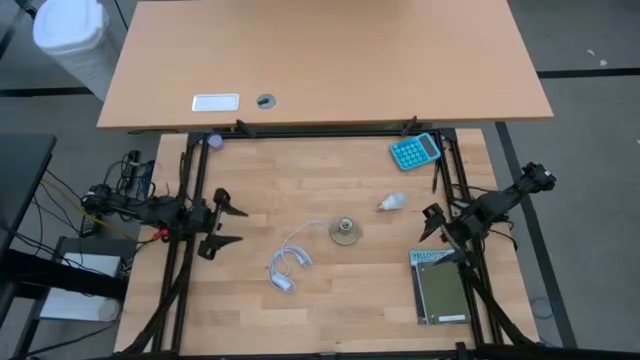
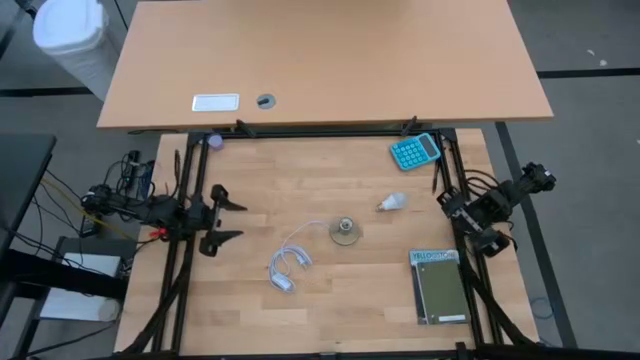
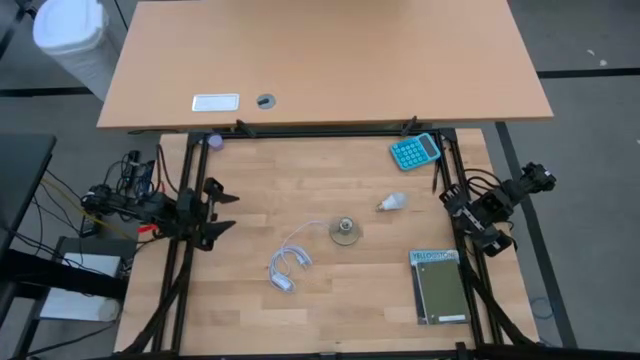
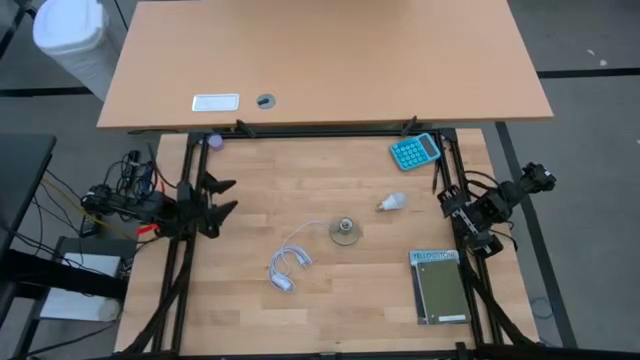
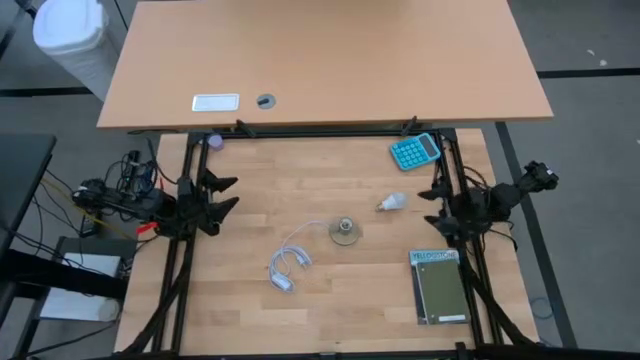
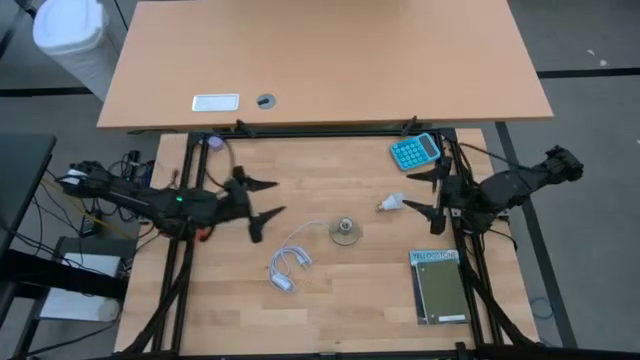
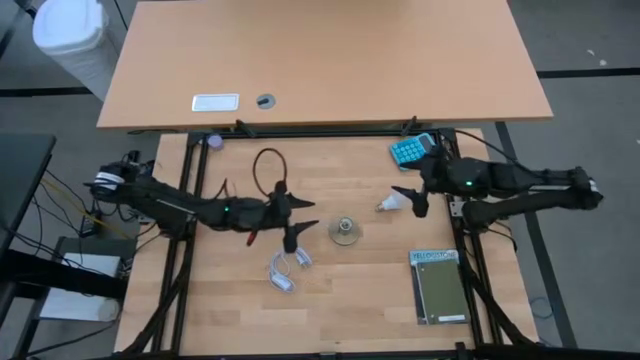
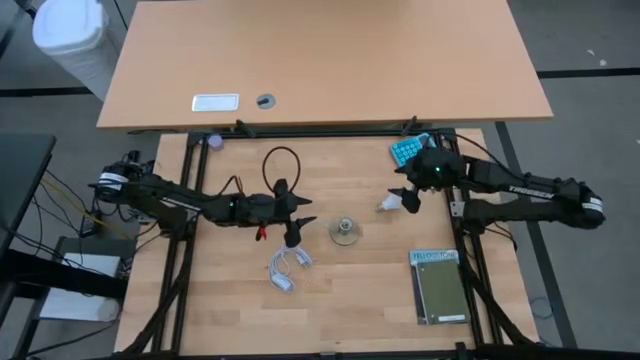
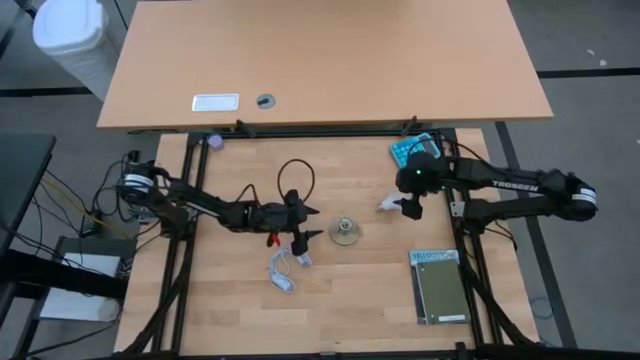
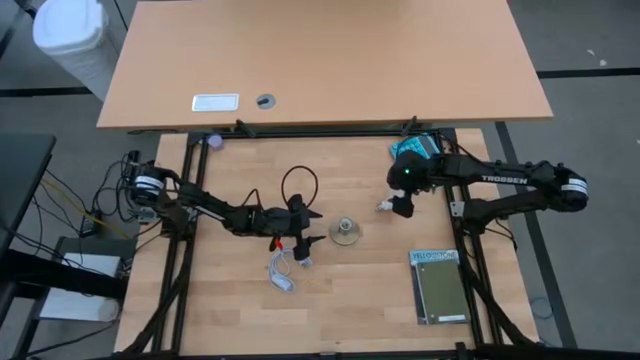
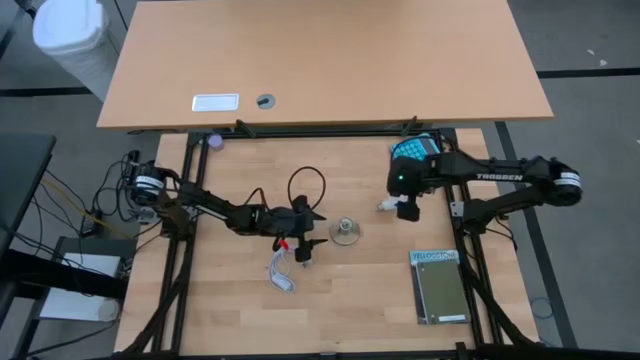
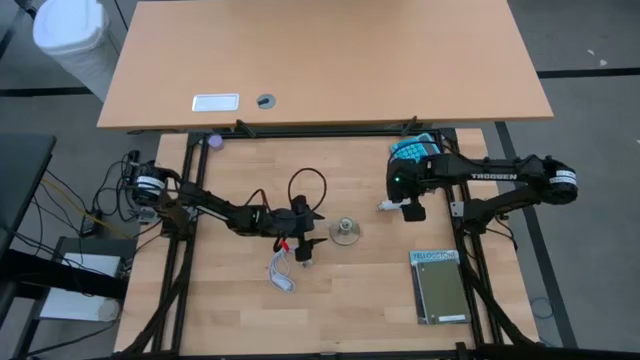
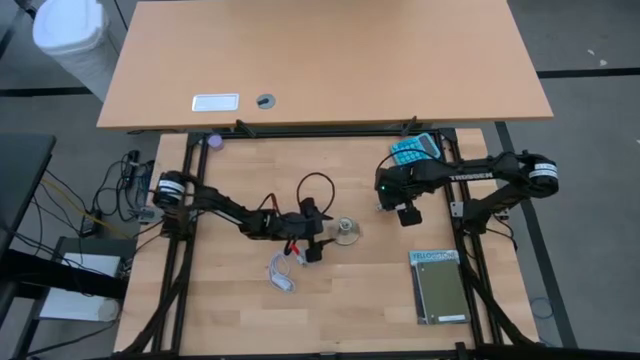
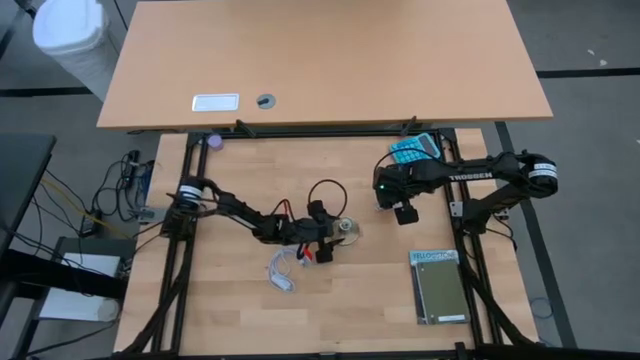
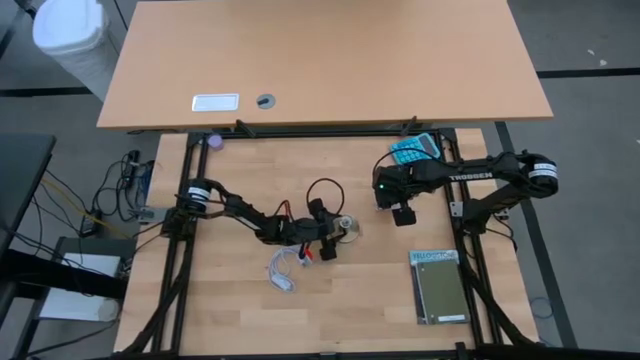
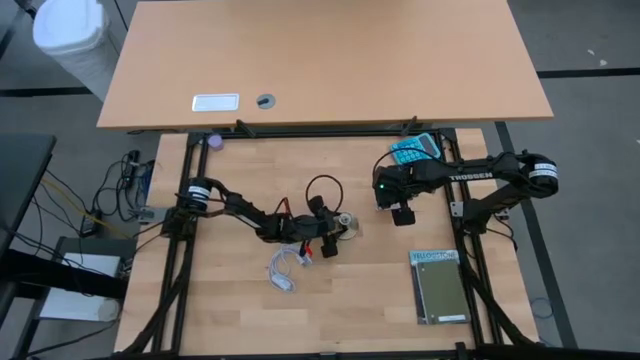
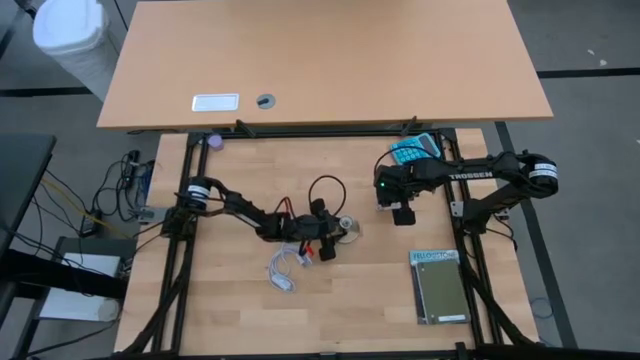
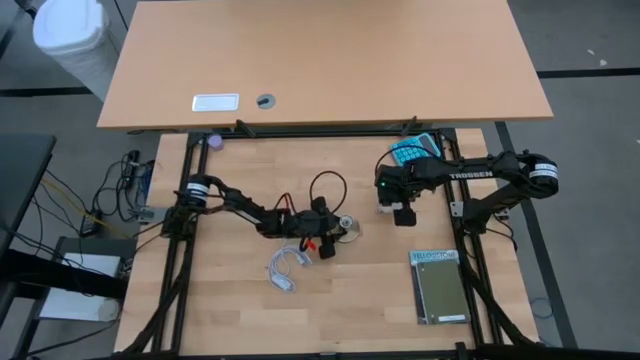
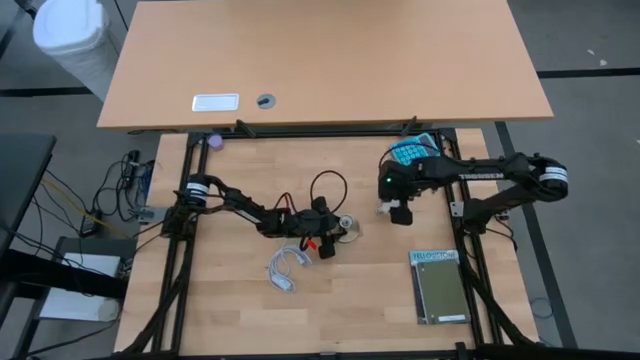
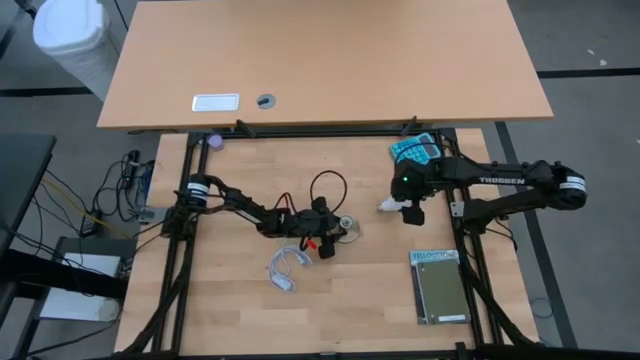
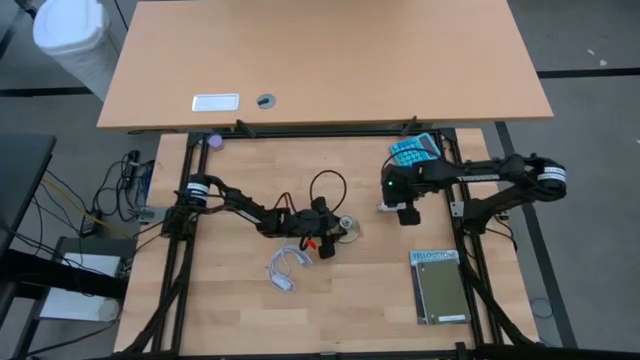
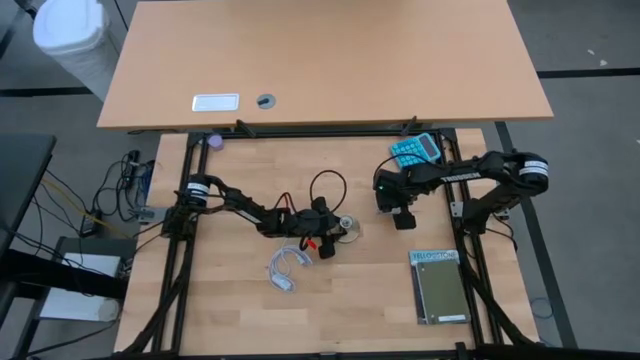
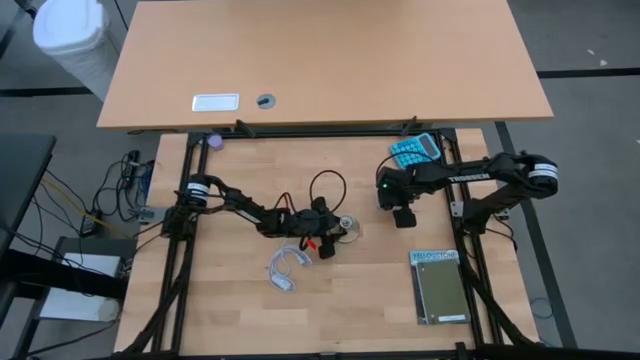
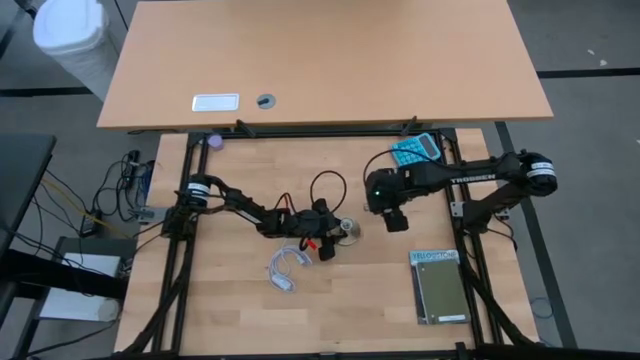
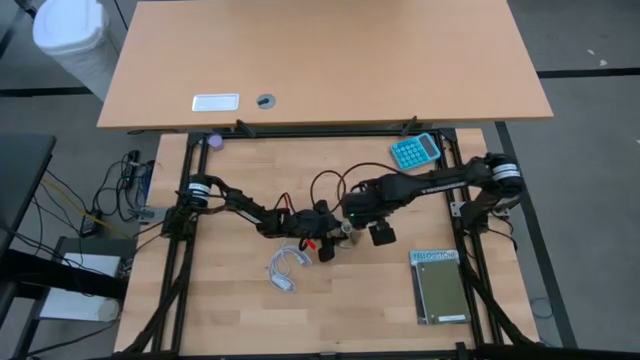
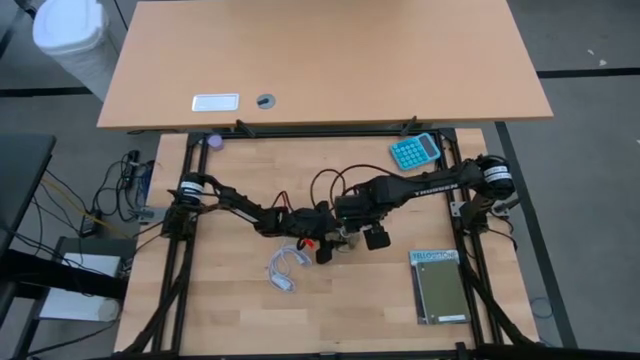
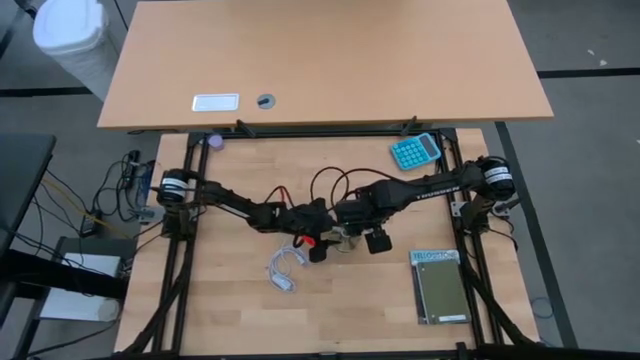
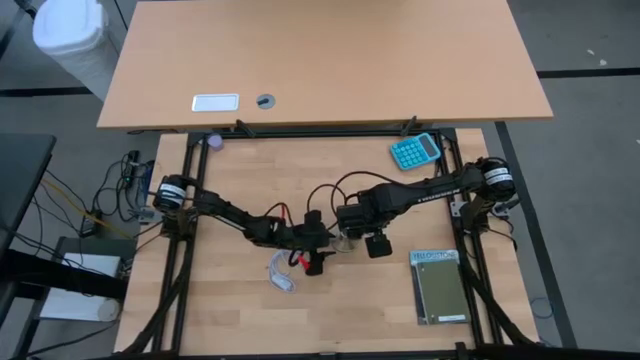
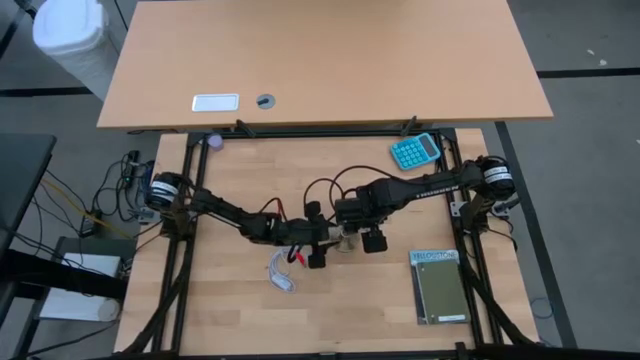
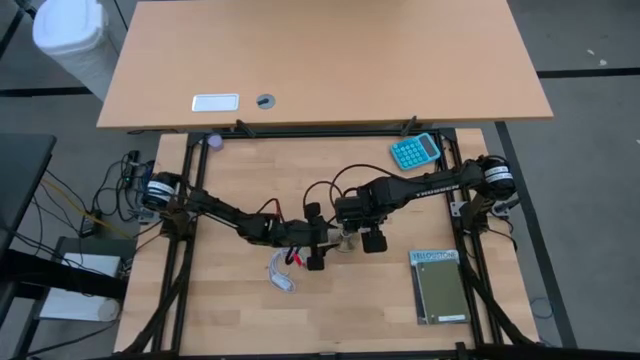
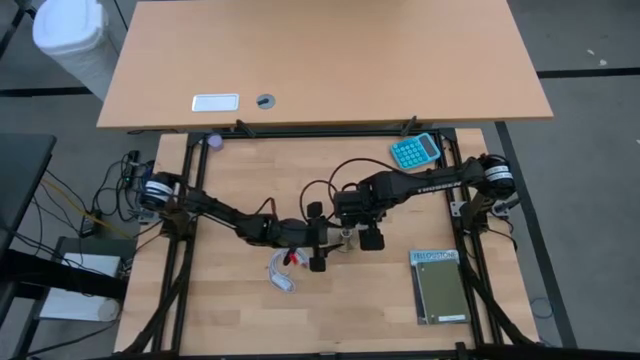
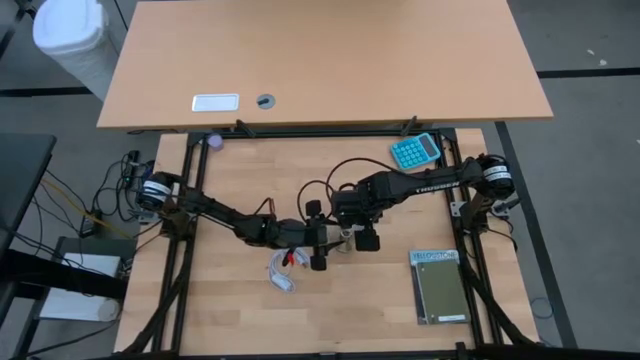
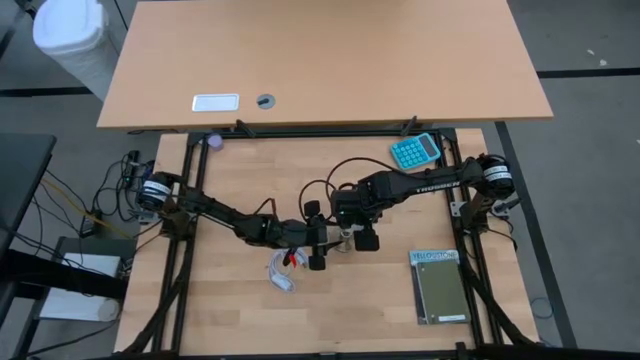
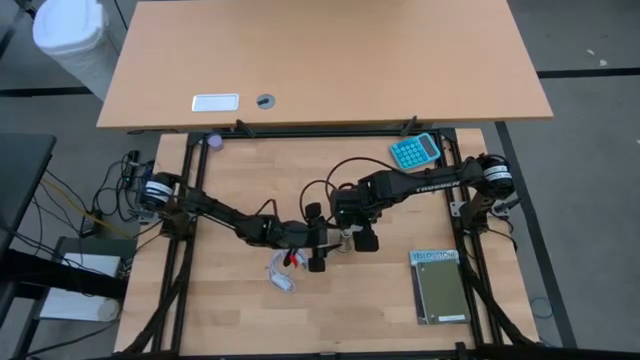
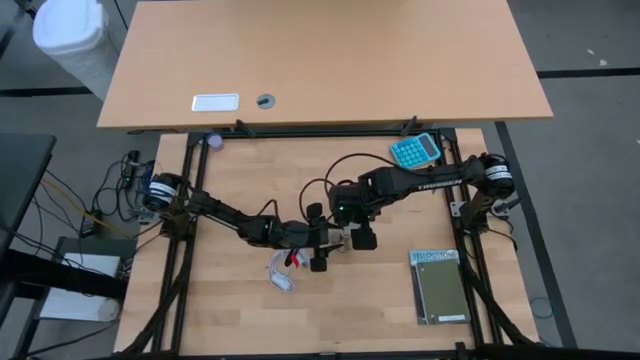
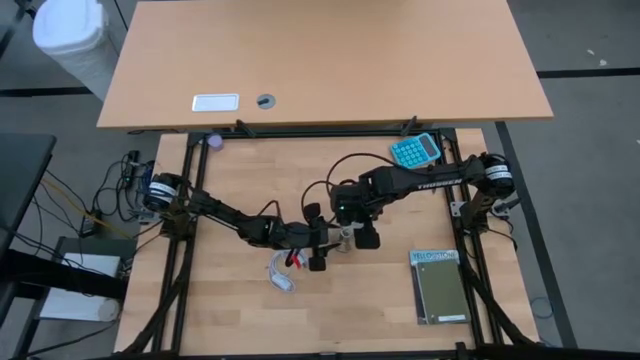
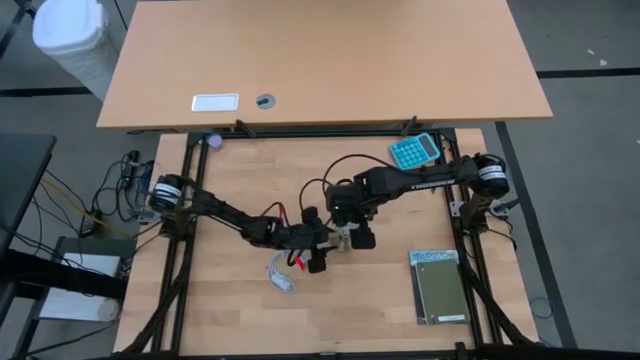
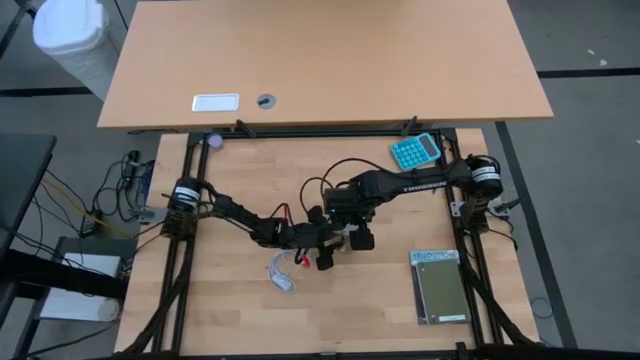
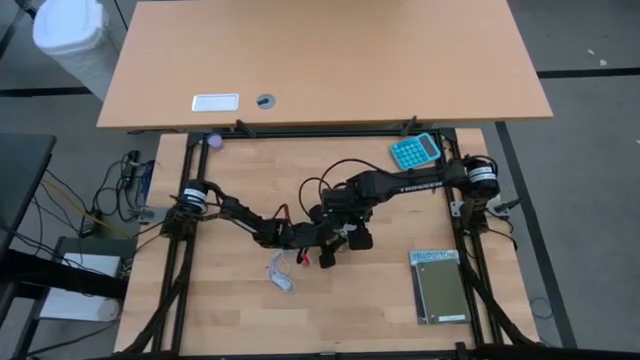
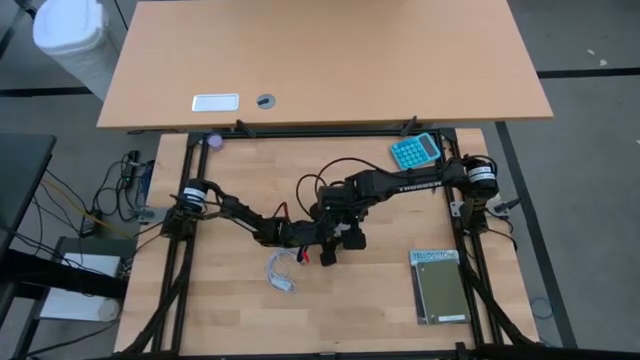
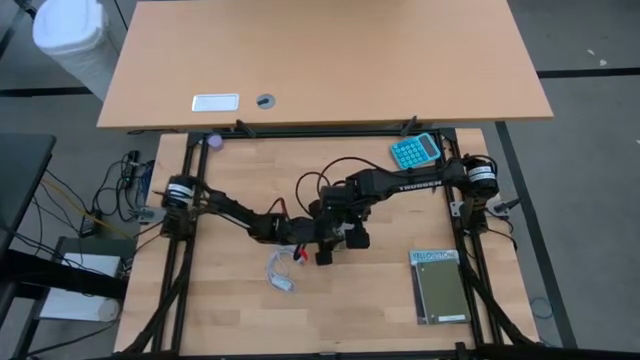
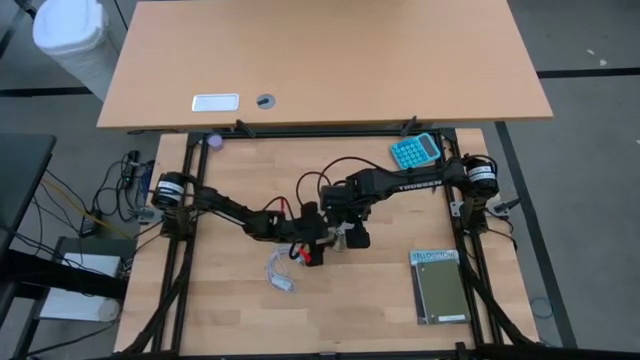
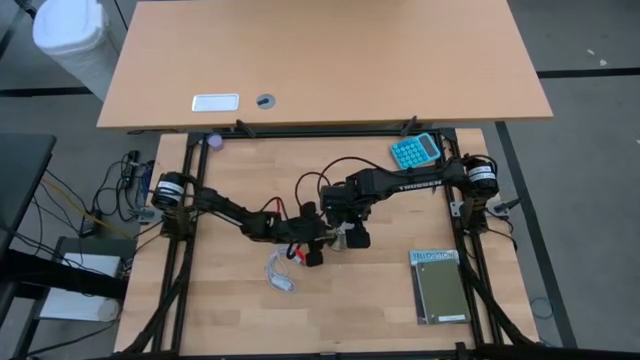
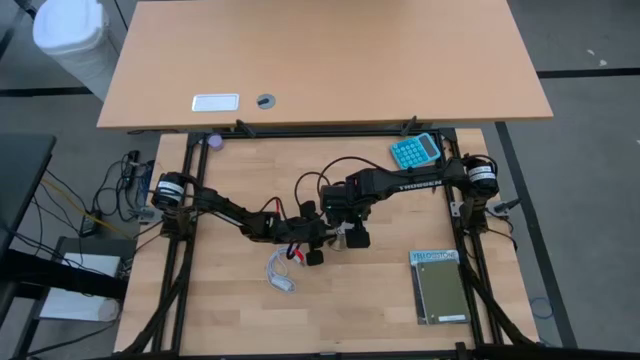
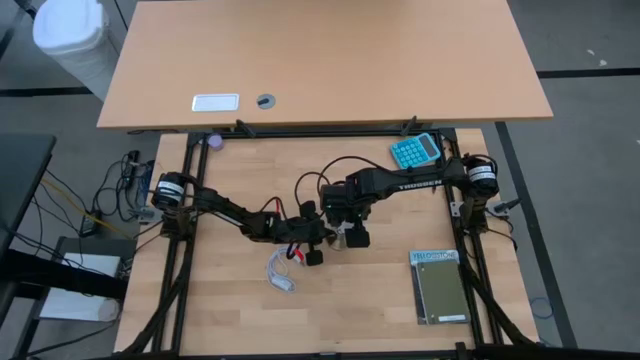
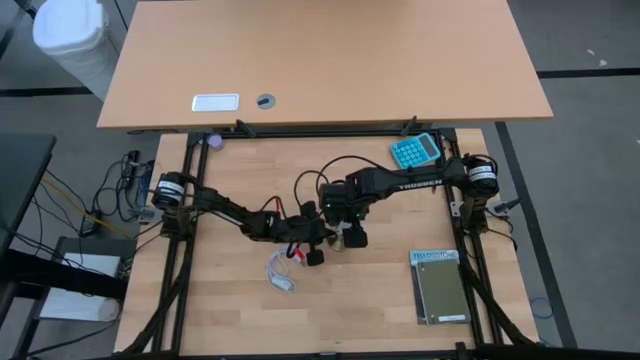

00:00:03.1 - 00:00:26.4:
Task: Screw lightbulb
Insert the lightbulb into the socket
